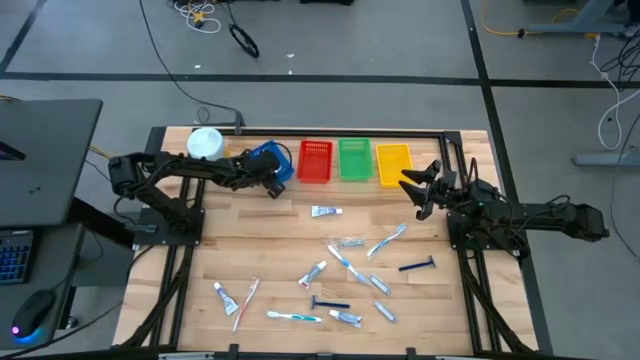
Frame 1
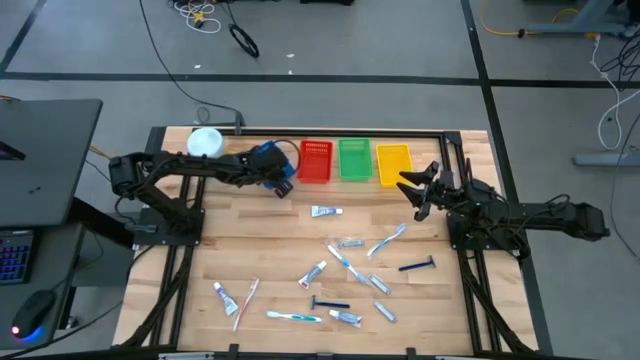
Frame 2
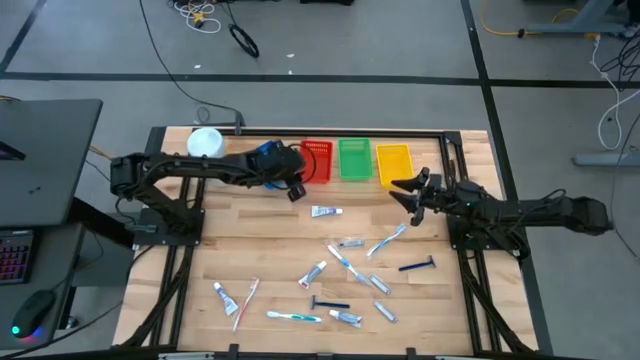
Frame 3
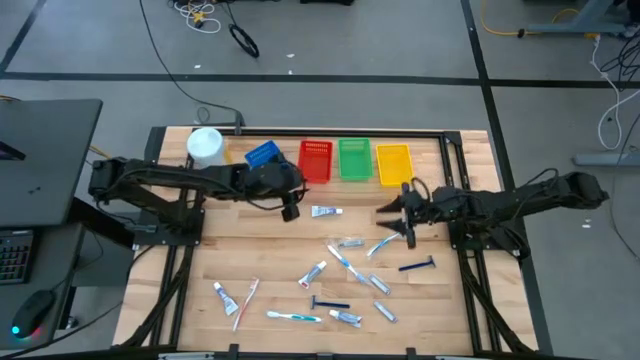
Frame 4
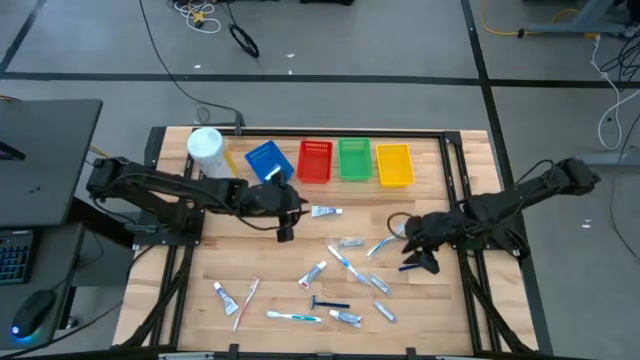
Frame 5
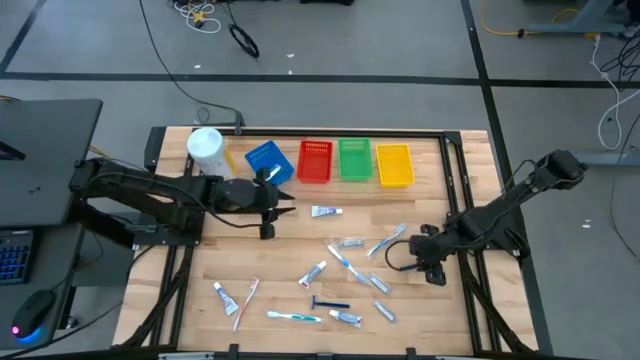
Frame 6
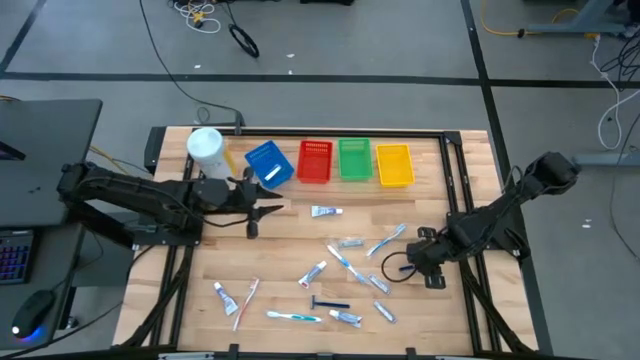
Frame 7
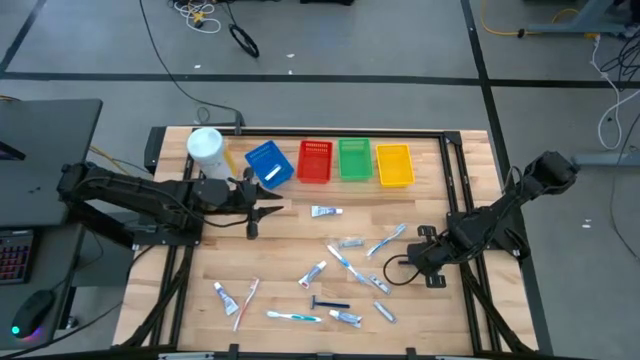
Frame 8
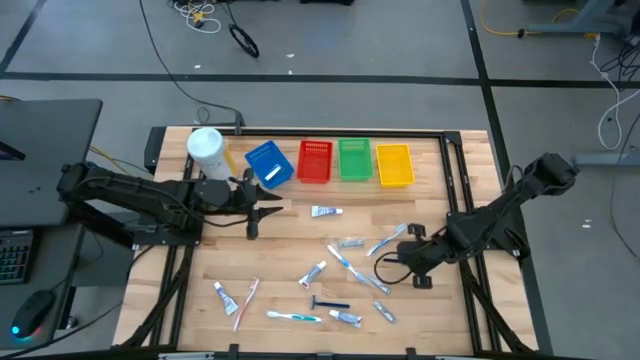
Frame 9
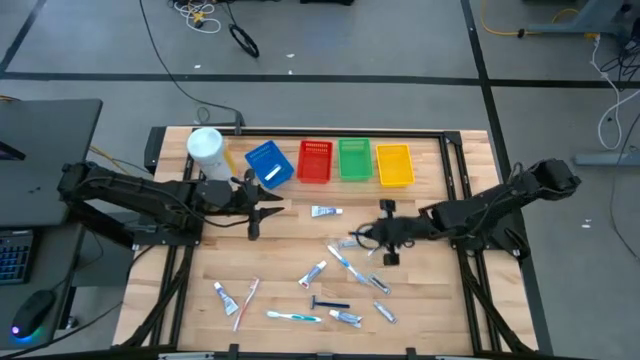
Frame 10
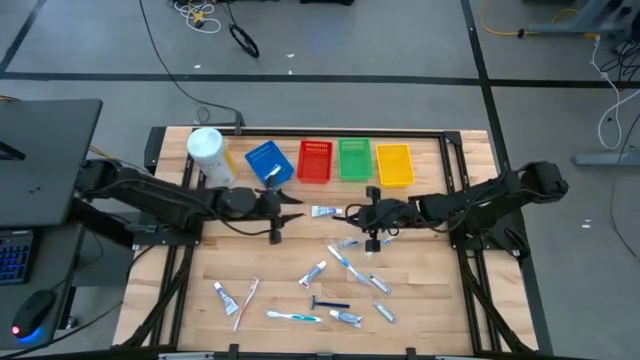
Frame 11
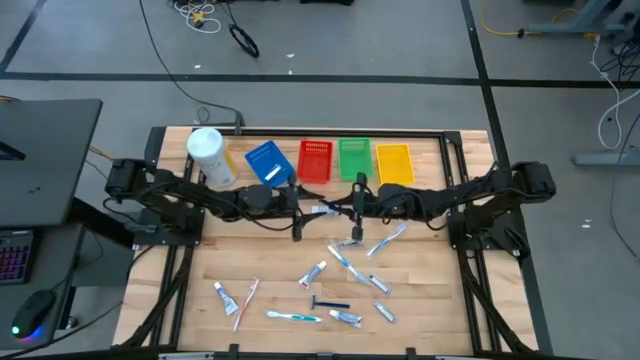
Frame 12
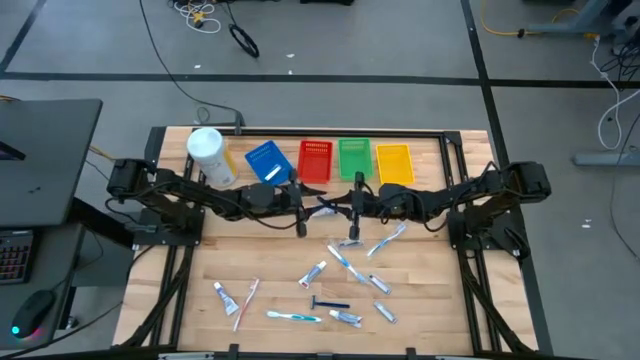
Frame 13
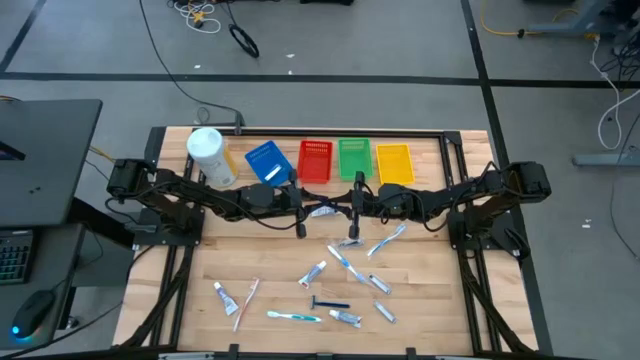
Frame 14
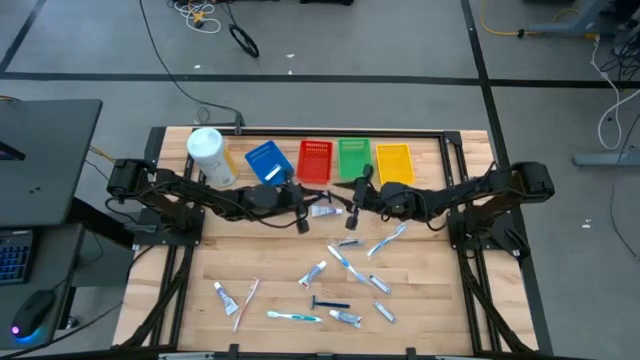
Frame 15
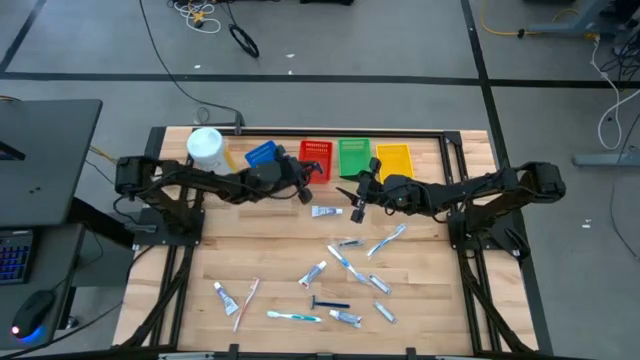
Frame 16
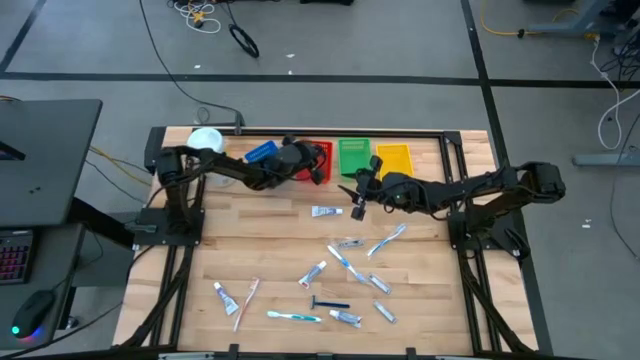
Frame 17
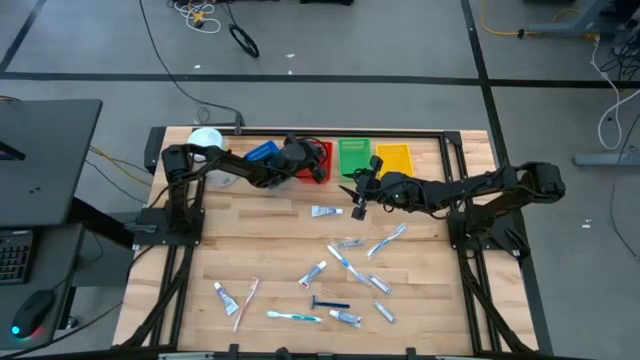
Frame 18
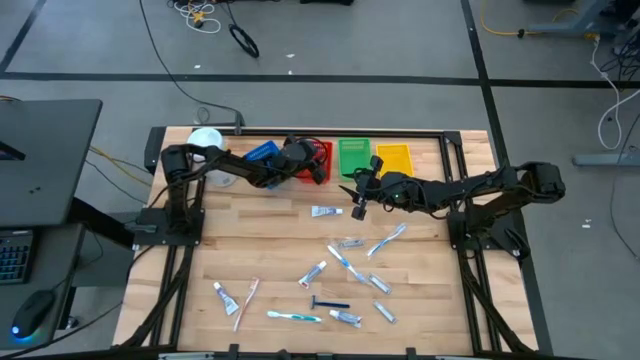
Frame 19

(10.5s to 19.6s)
Task: Pick & Place Travel size toiletries
Put the blue razor into the red basket

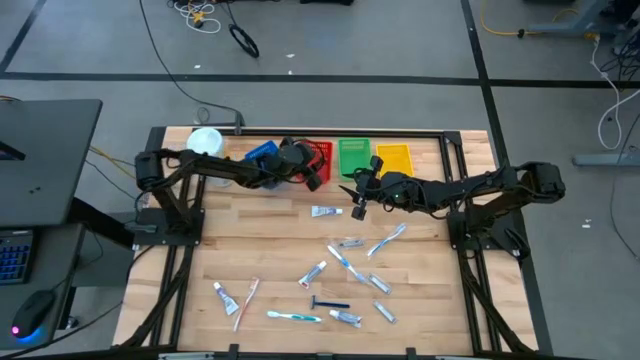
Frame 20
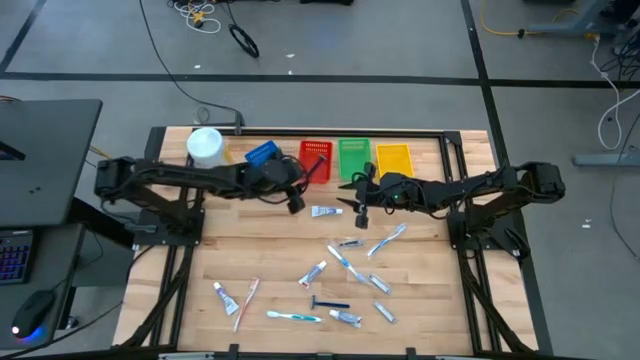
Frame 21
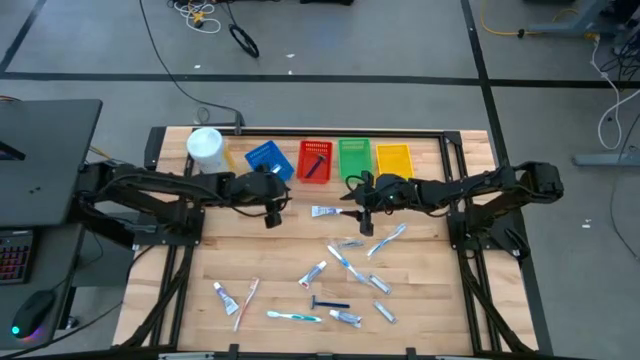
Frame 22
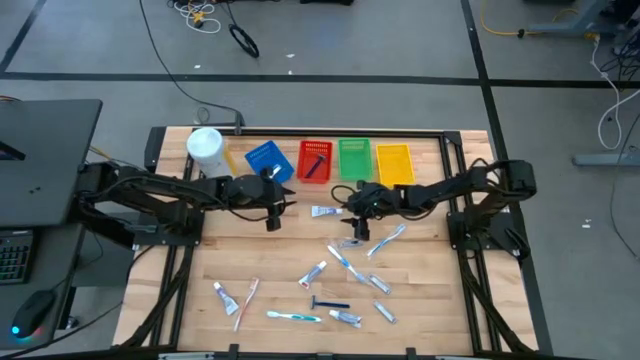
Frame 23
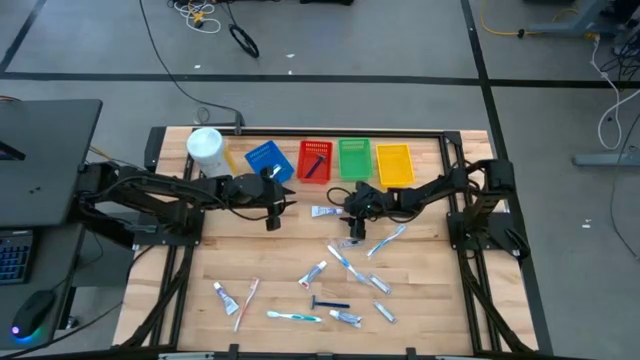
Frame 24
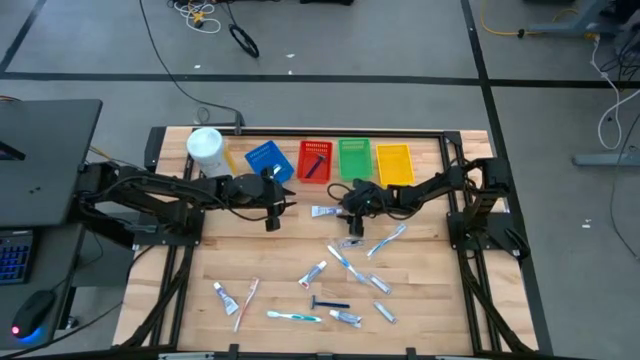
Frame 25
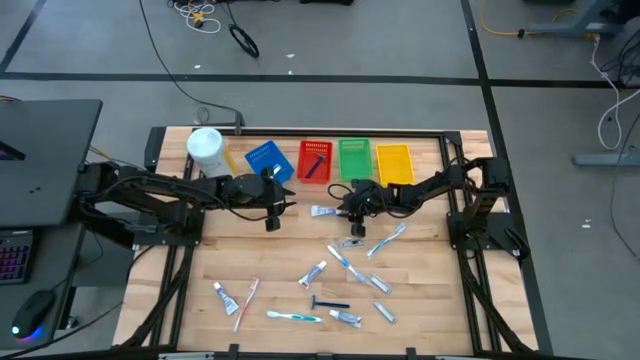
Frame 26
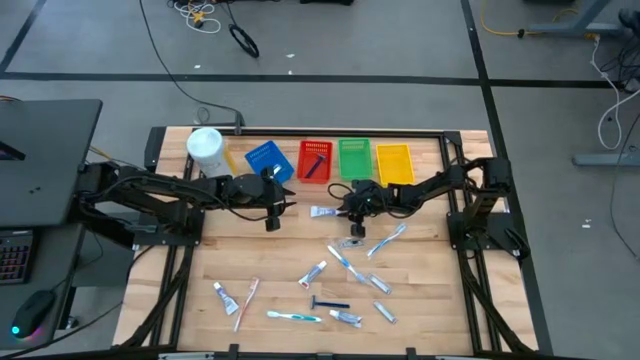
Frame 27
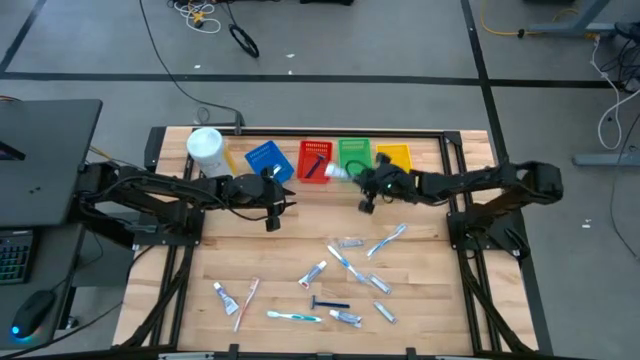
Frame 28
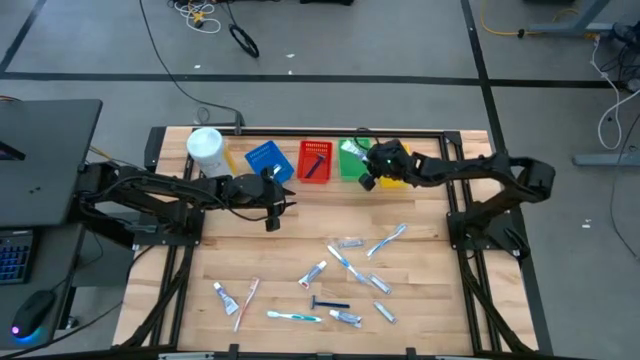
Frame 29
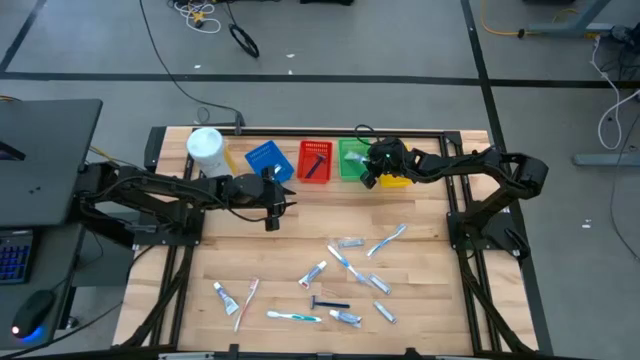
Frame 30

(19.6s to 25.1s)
Put the white toothpaste into the green basket

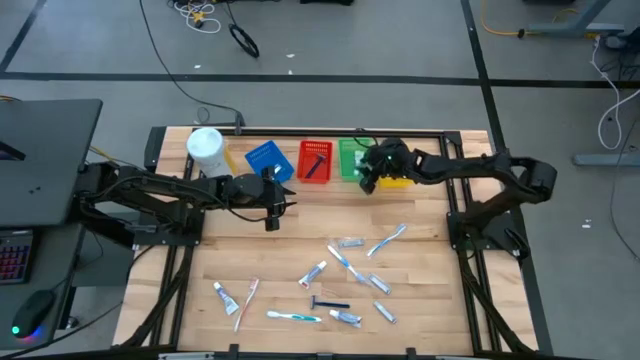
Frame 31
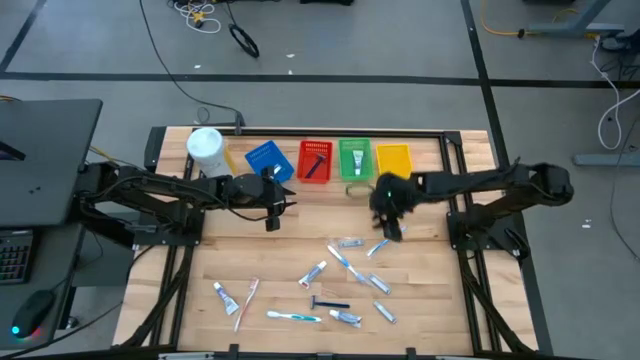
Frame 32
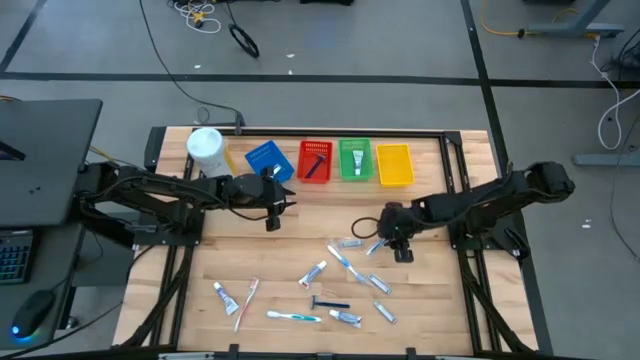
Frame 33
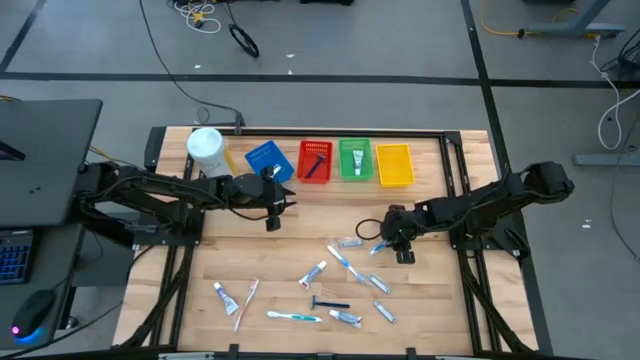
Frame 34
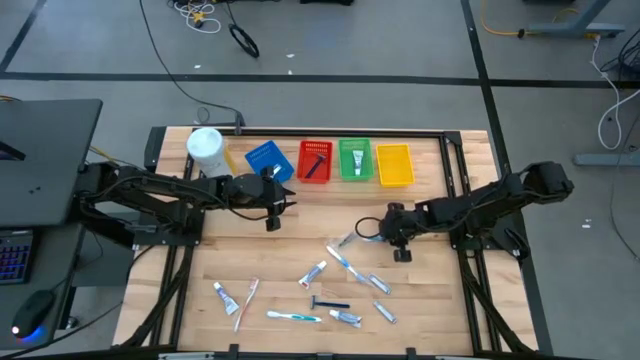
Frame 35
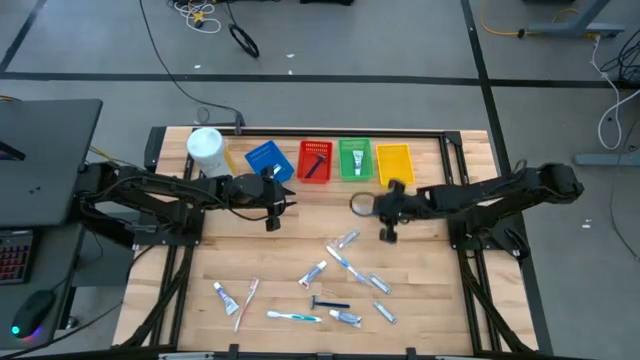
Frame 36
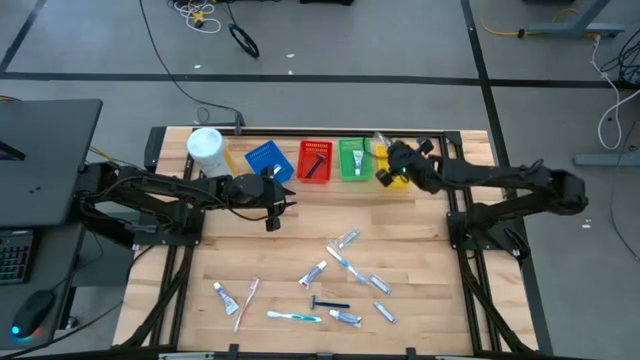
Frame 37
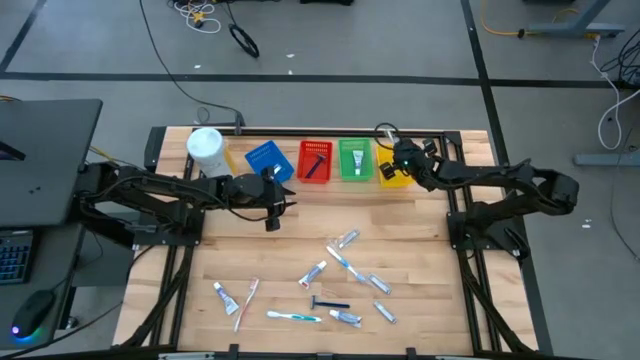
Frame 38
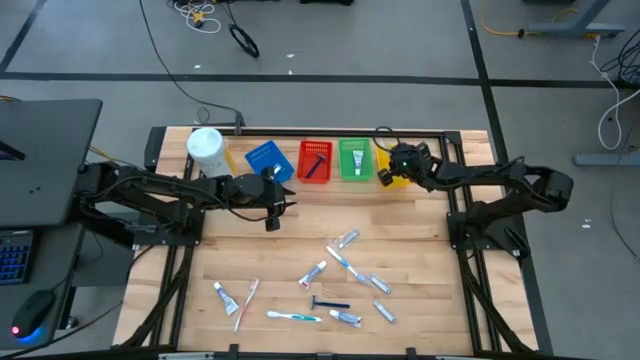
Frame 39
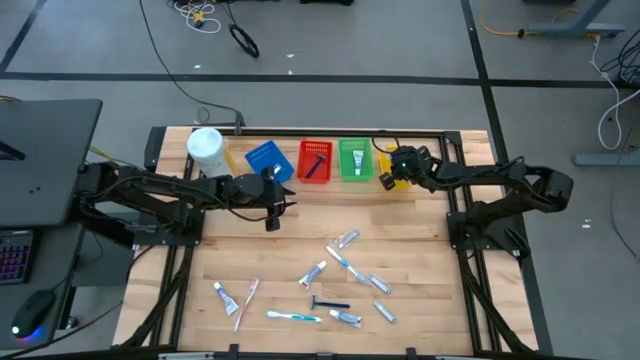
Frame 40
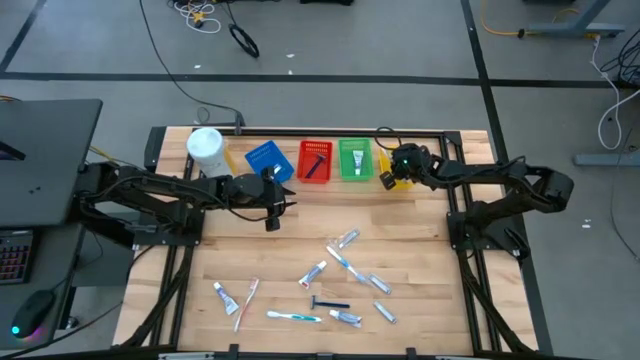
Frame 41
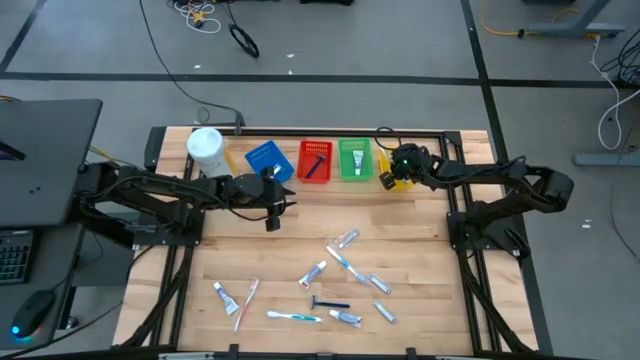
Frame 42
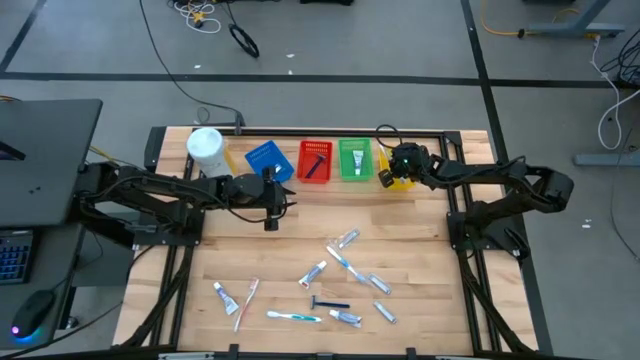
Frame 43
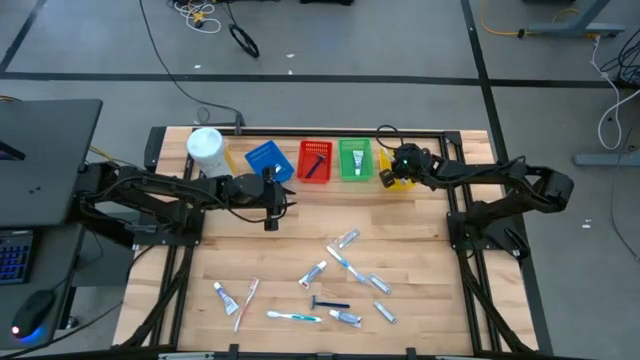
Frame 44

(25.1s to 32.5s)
Put the blue toothbrush into the yellow basket
